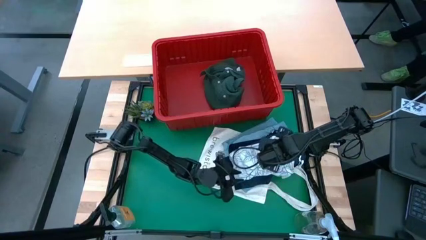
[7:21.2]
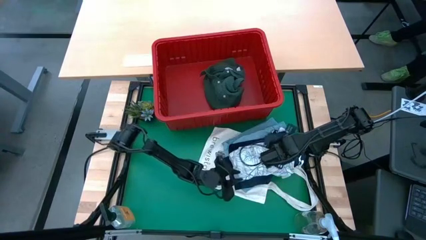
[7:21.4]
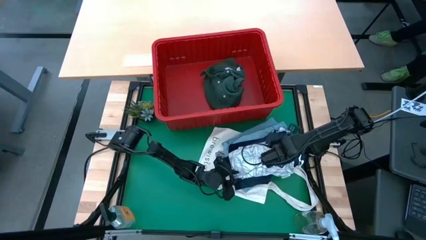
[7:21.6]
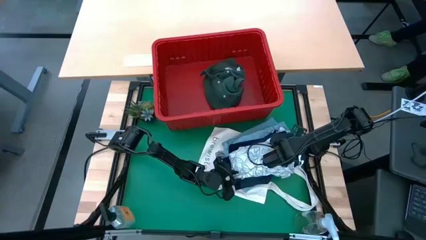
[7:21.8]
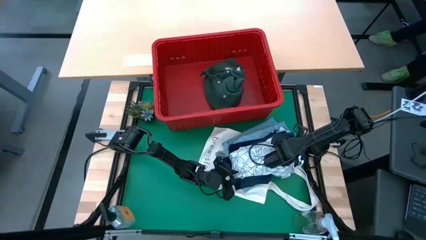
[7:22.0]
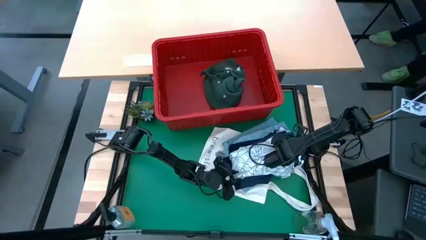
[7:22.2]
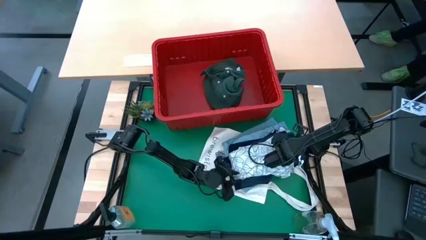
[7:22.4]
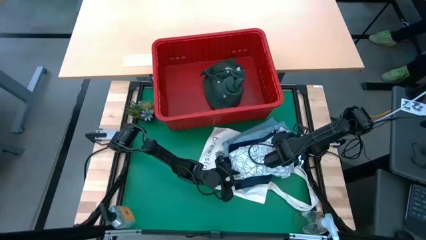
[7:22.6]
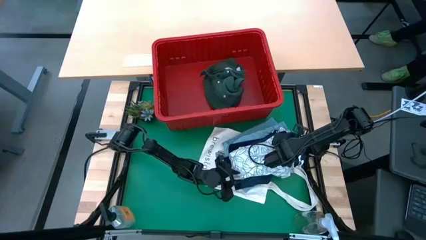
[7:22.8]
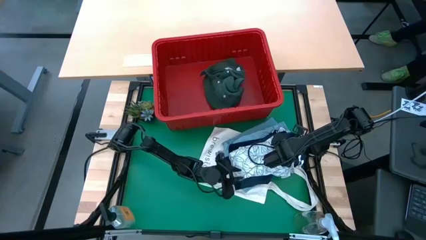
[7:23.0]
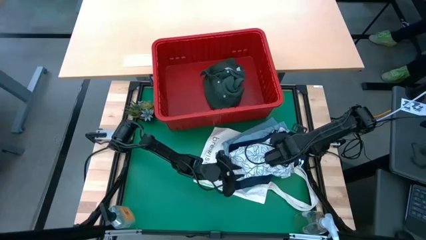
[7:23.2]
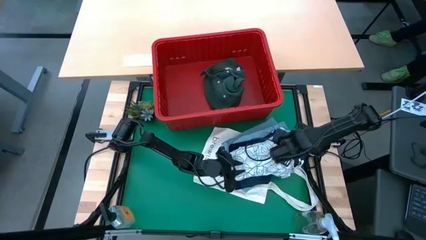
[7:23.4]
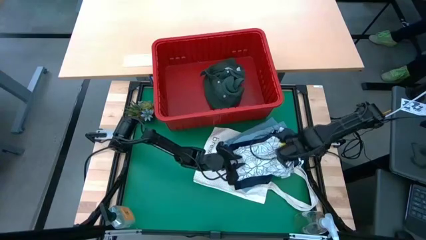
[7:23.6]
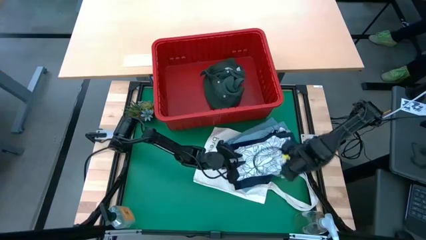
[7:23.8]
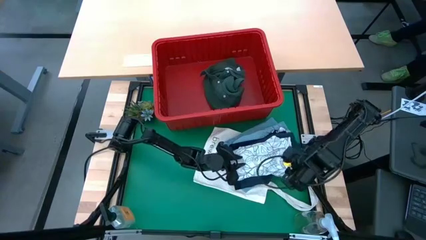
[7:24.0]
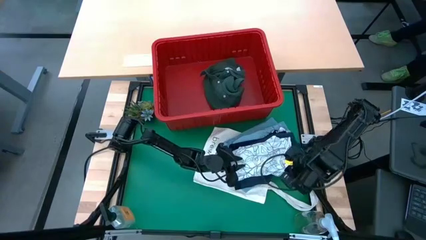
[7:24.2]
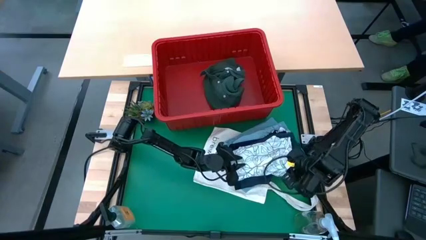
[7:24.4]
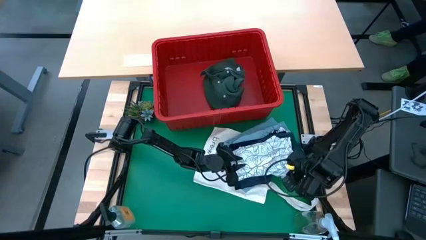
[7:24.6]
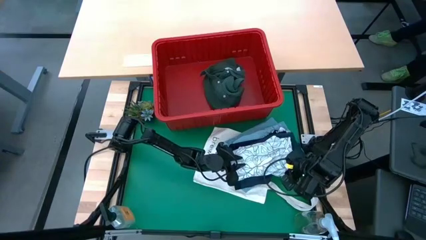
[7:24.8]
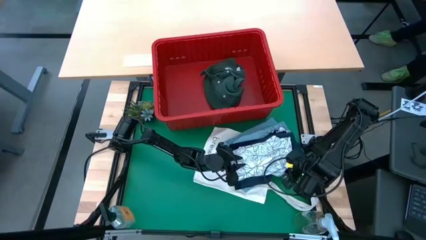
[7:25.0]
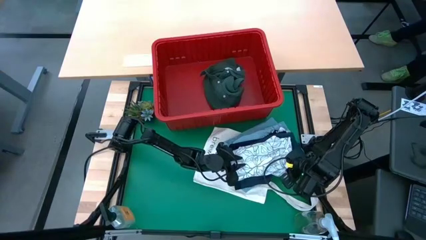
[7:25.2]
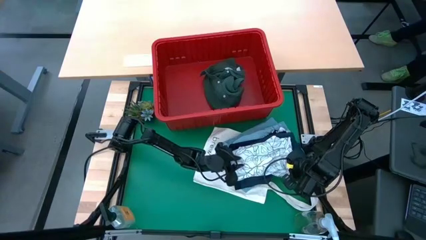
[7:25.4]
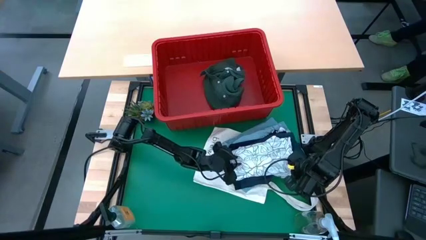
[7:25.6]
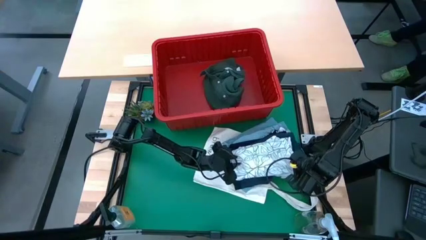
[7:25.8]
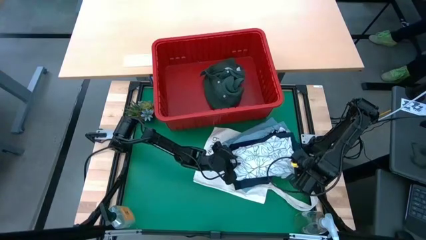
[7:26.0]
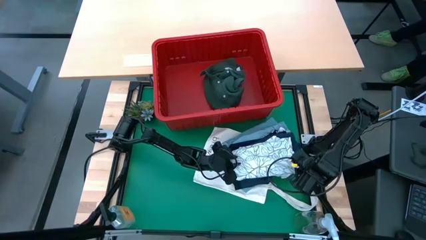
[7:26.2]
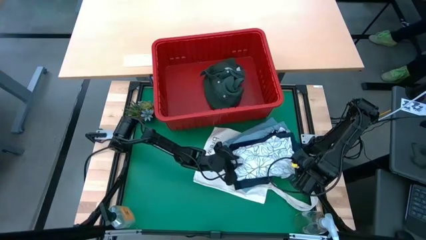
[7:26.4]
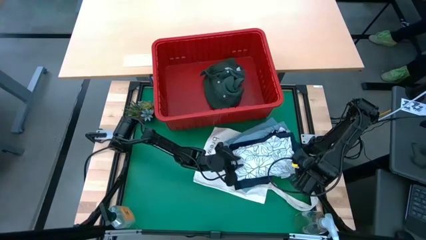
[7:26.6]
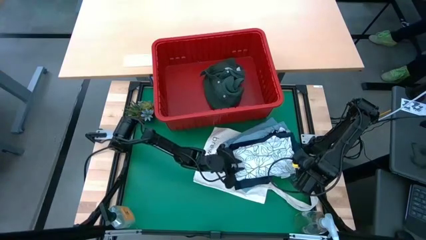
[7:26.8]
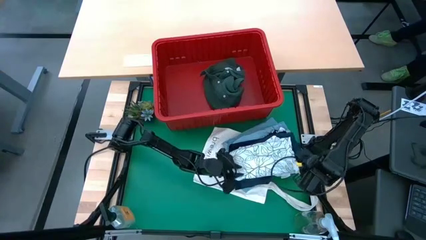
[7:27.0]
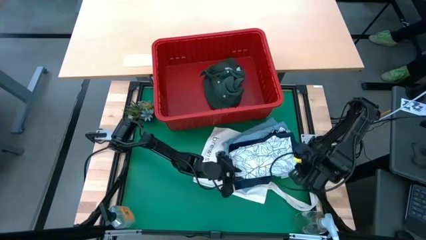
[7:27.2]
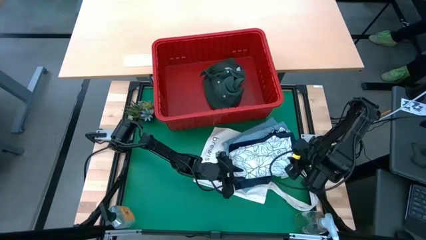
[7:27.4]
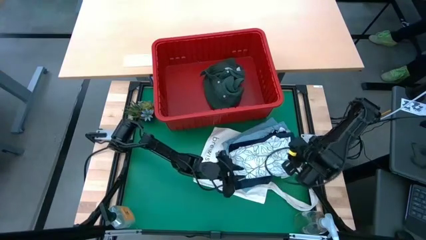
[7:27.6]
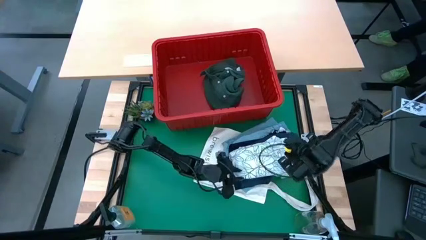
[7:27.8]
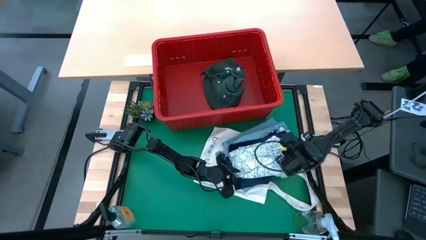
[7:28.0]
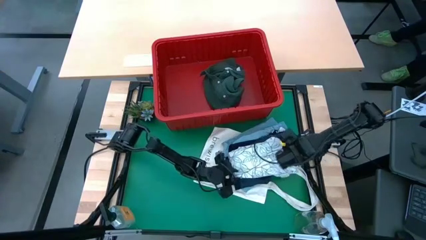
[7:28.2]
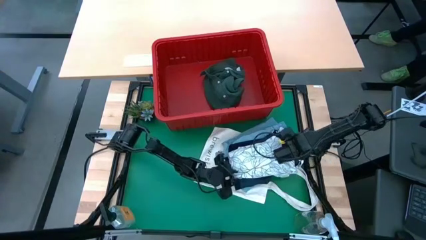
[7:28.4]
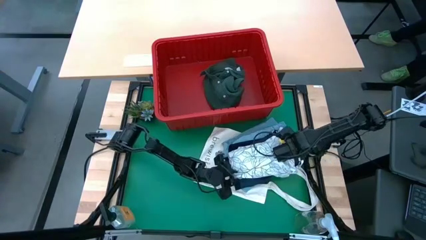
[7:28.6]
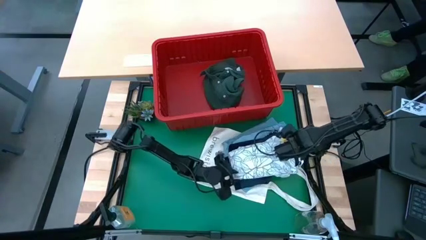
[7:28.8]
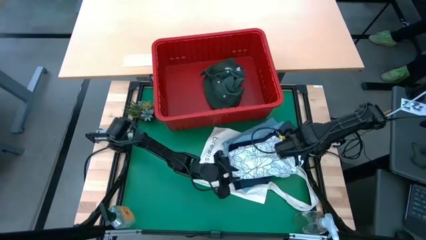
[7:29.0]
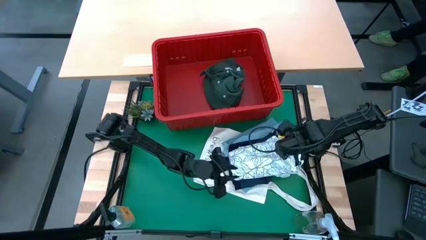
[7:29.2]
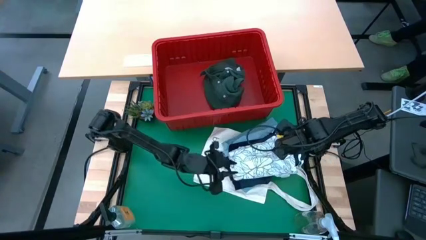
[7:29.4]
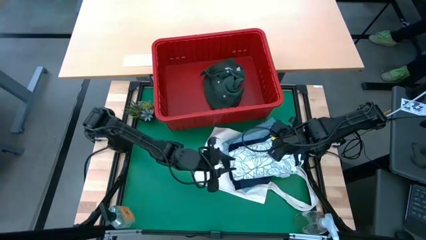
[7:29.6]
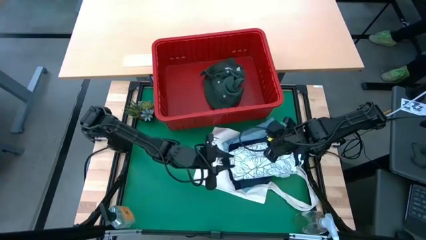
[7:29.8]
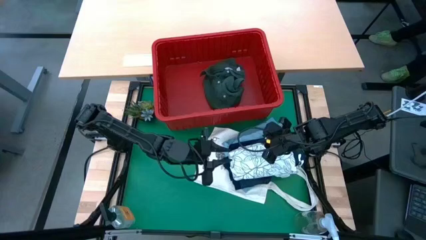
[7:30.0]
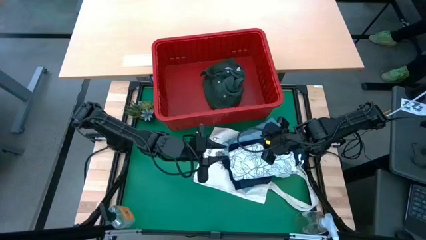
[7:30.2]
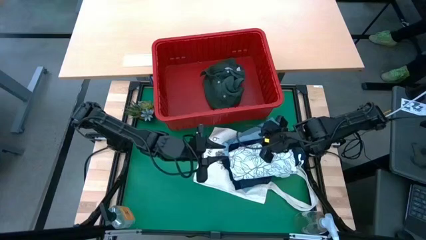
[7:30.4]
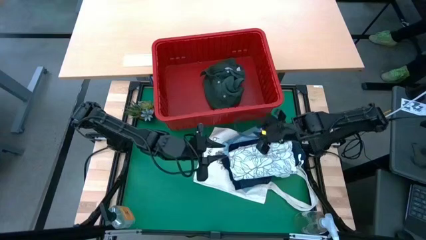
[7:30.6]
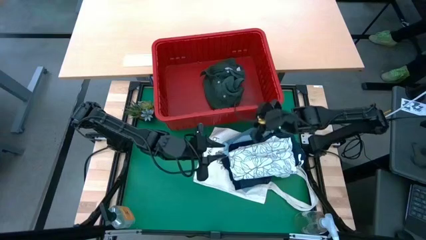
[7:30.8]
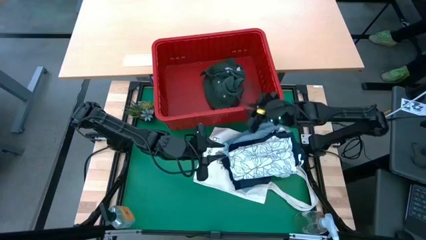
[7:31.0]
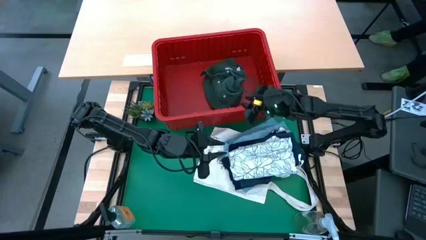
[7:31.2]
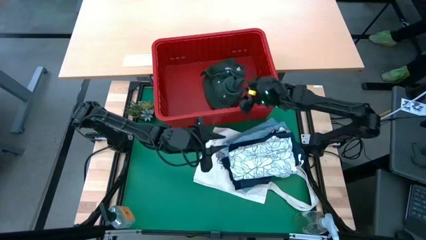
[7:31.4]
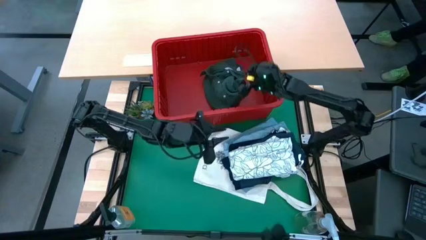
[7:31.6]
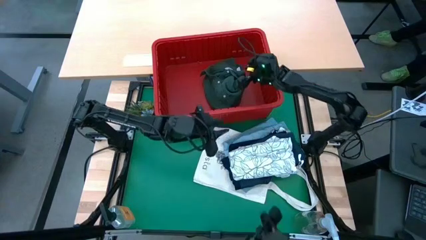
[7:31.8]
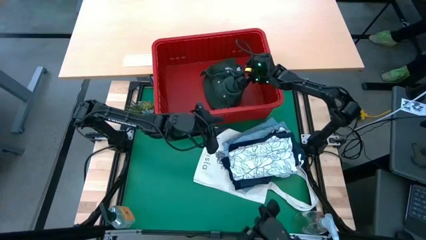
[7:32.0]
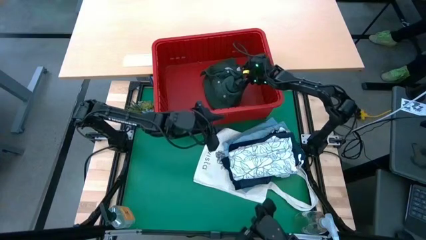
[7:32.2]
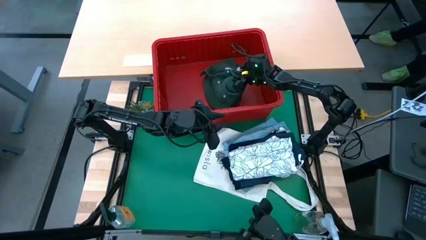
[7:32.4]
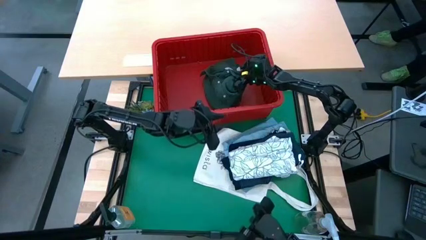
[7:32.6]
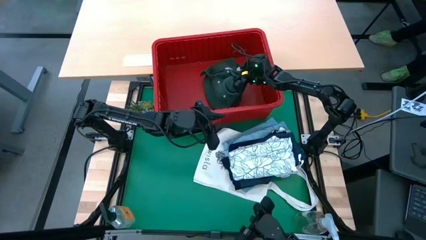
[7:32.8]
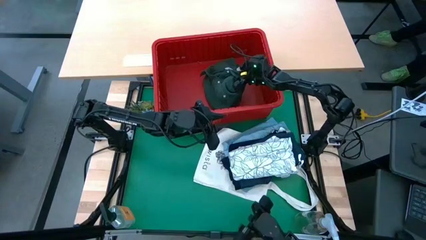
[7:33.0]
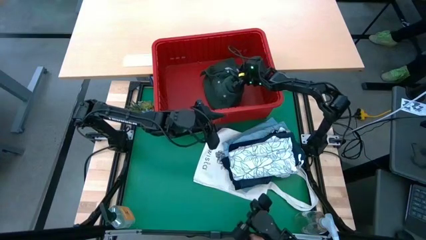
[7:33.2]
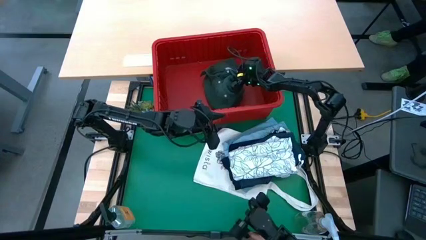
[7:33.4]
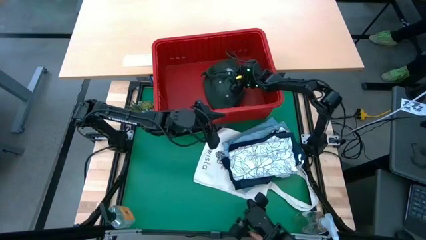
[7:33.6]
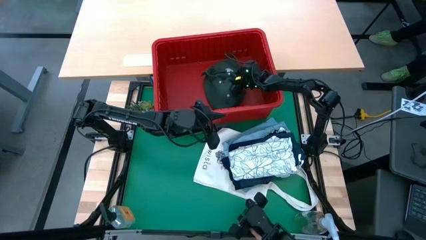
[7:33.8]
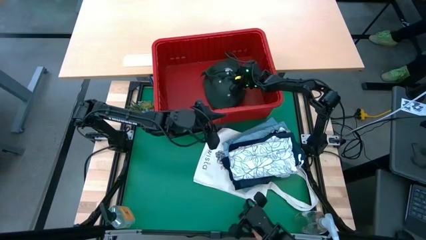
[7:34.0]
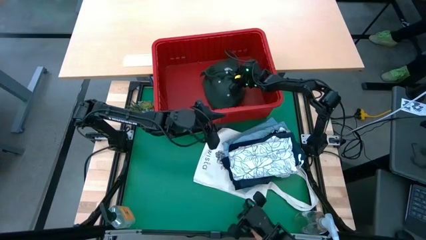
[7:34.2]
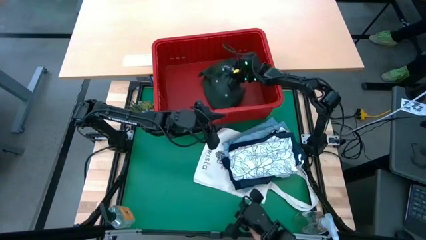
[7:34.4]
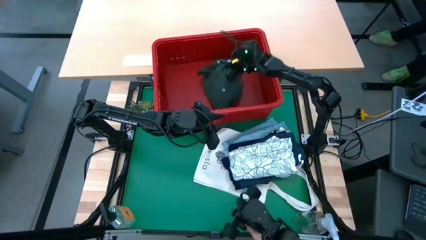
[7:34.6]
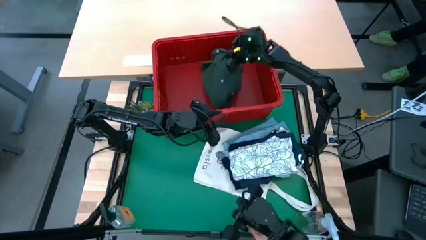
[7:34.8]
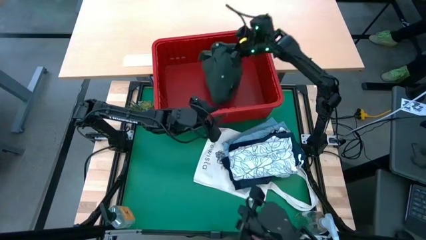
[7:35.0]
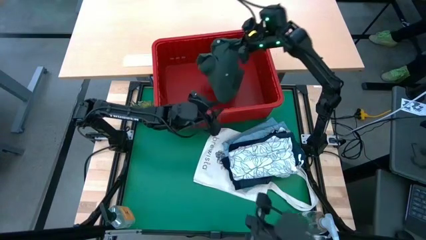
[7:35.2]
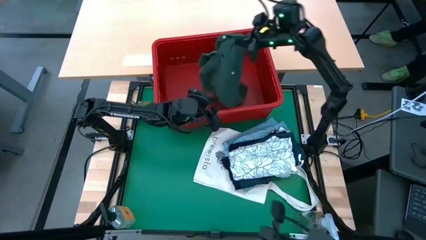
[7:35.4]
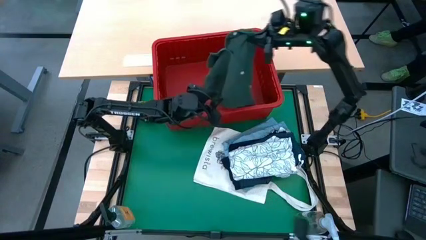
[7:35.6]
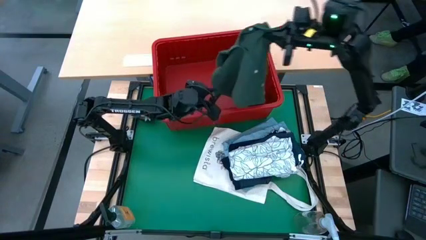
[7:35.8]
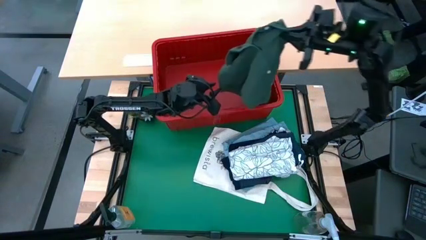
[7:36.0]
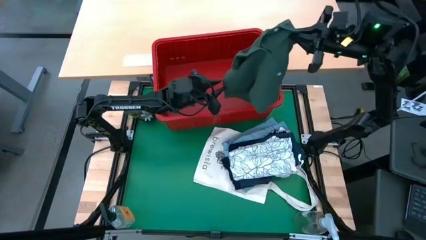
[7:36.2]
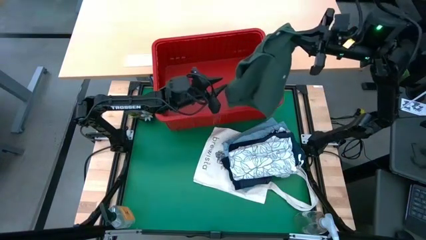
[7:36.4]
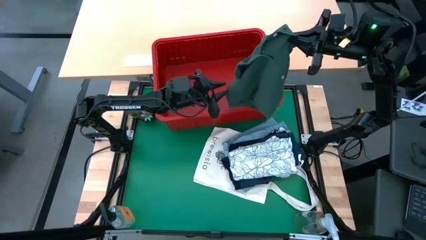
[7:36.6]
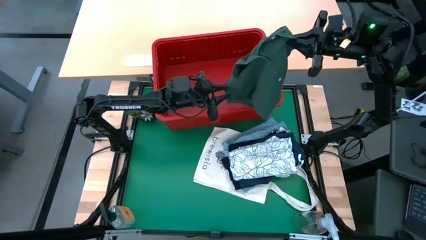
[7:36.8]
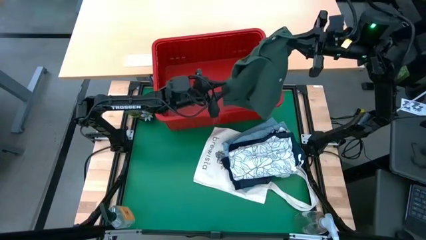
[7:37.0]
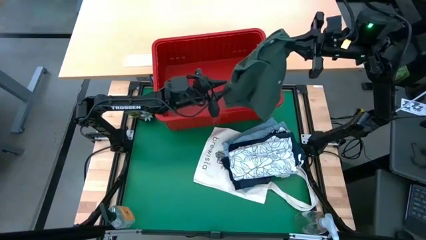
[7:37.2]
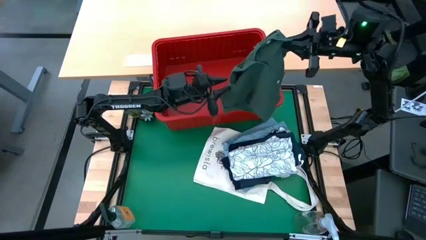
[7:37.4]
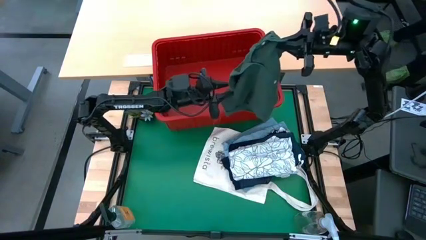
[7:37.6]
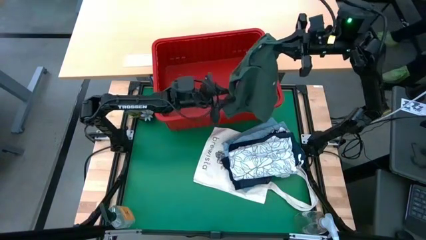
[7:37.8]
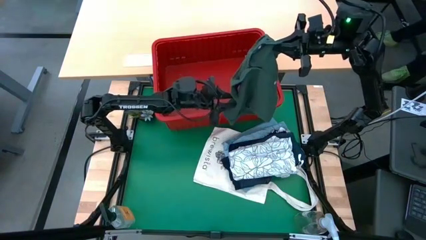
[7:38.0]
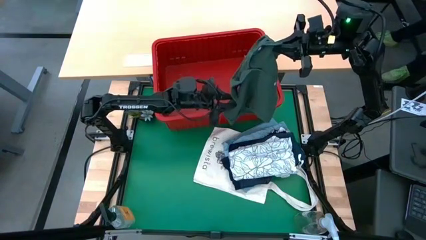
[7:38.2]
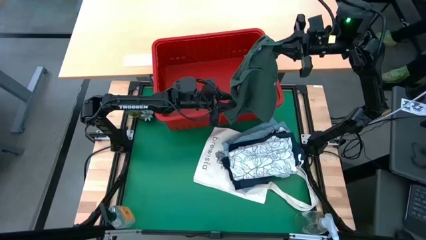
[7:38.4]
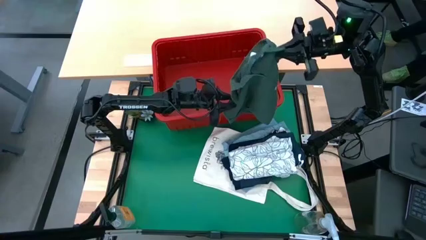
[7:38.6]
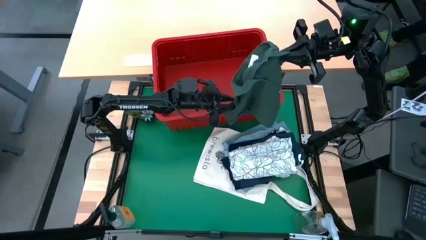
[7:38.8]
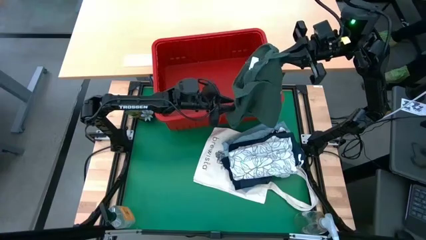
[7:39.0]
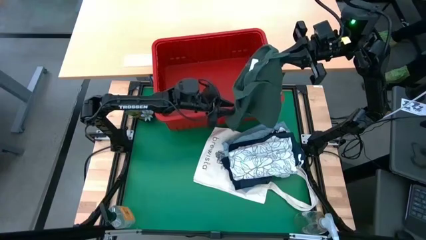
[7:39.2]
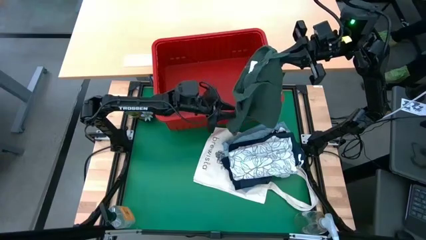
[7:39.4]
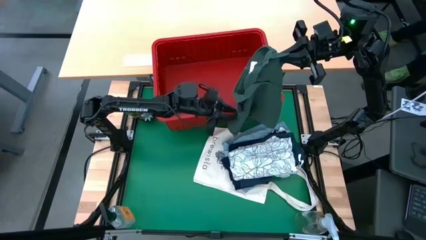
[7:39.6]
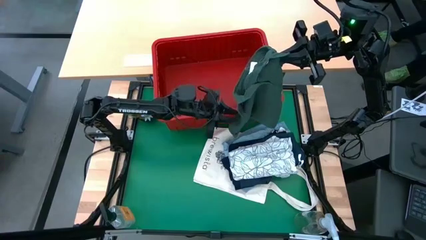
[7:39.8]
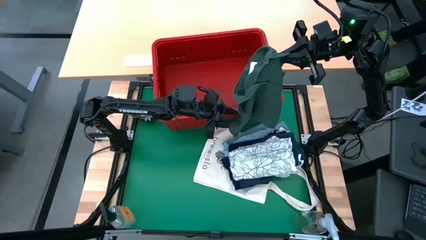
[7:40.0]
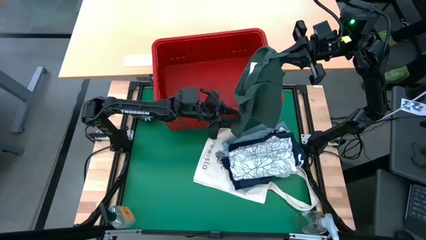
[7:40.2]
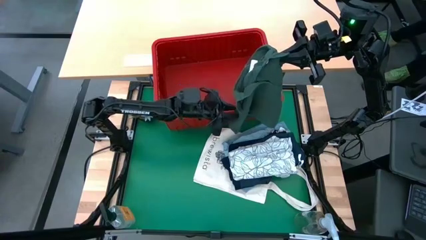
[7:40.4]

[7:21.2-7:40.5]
Task: Fold laundry
Fold the patterned white shirt
